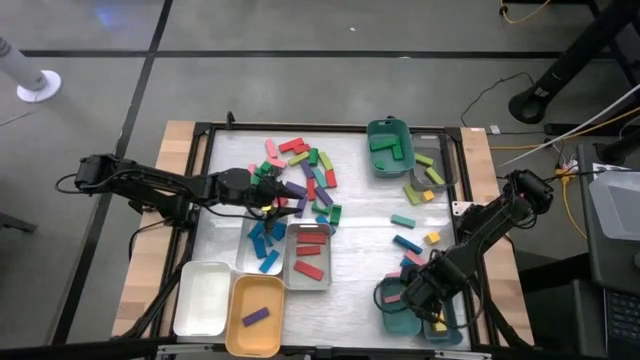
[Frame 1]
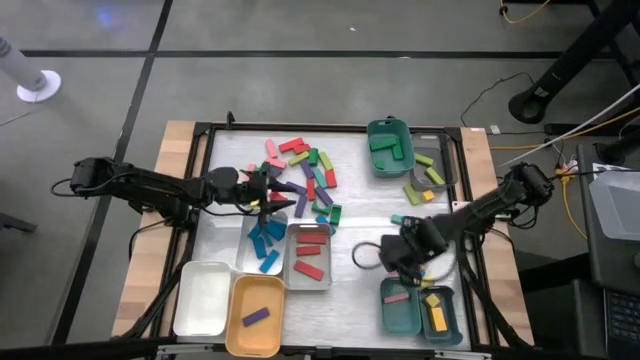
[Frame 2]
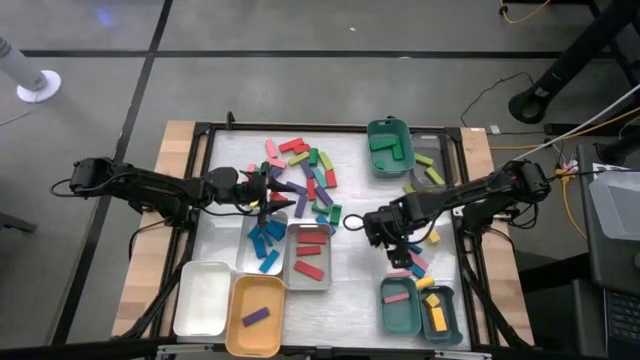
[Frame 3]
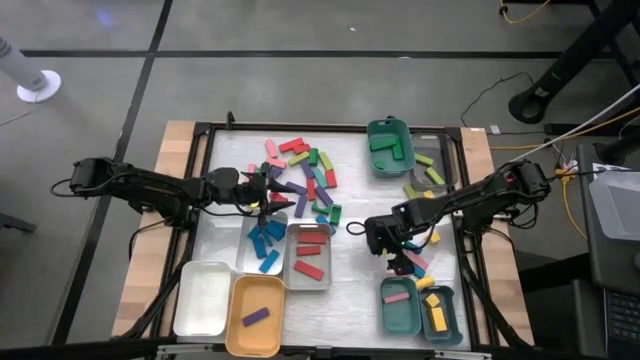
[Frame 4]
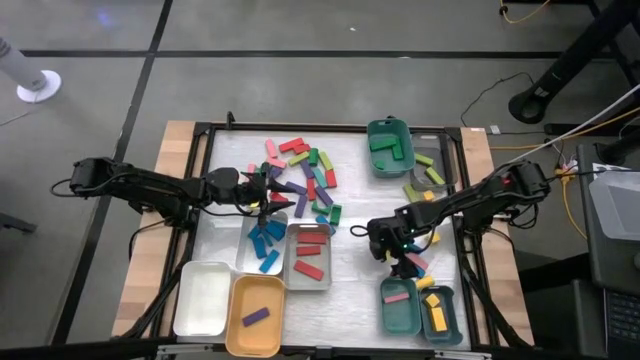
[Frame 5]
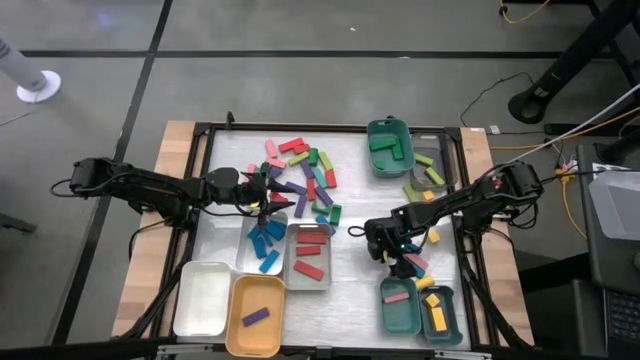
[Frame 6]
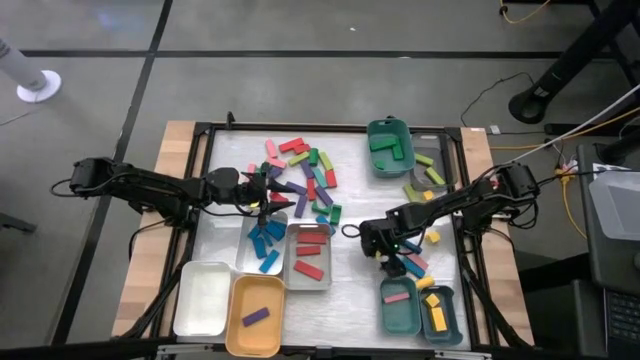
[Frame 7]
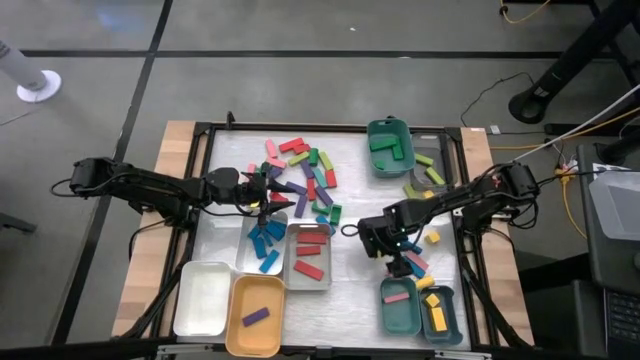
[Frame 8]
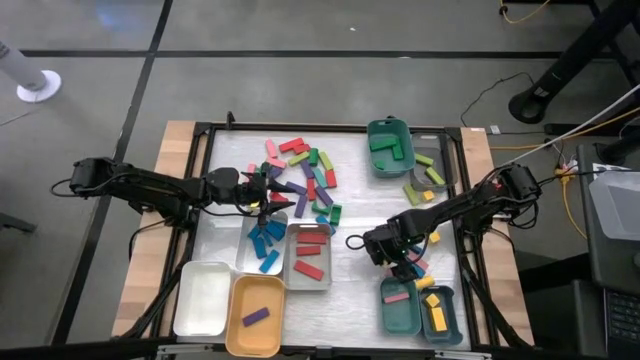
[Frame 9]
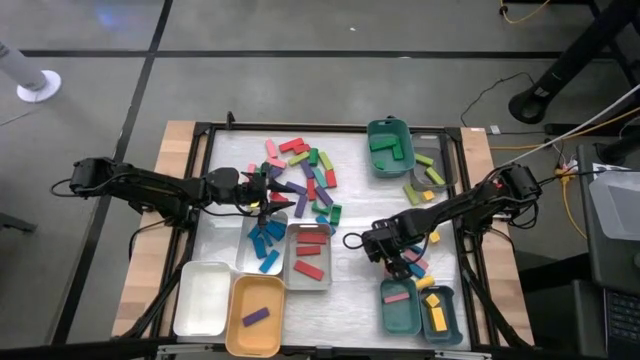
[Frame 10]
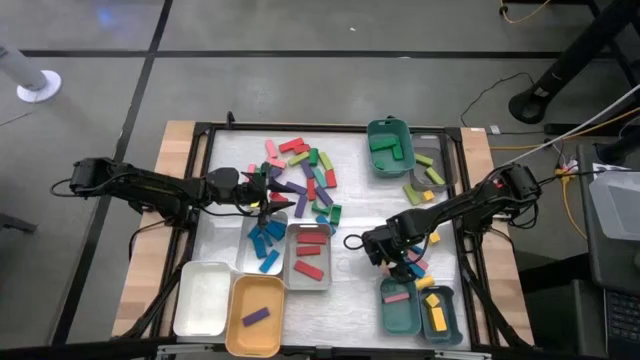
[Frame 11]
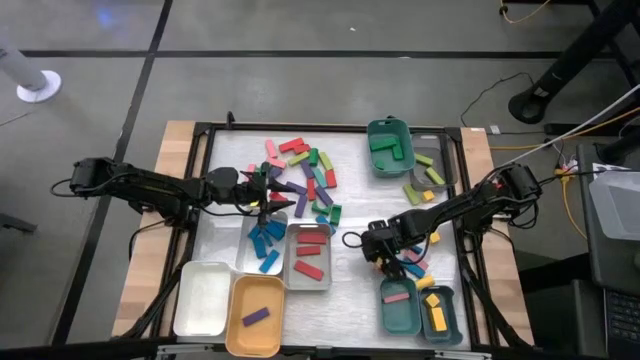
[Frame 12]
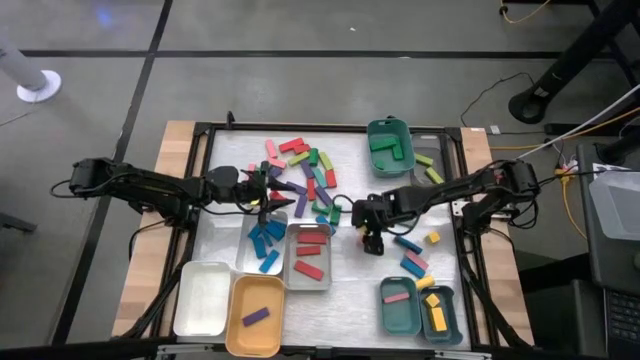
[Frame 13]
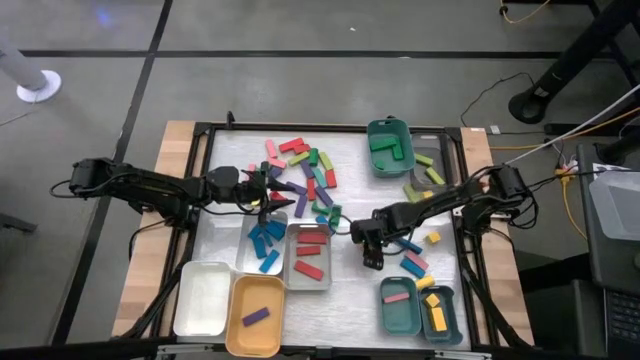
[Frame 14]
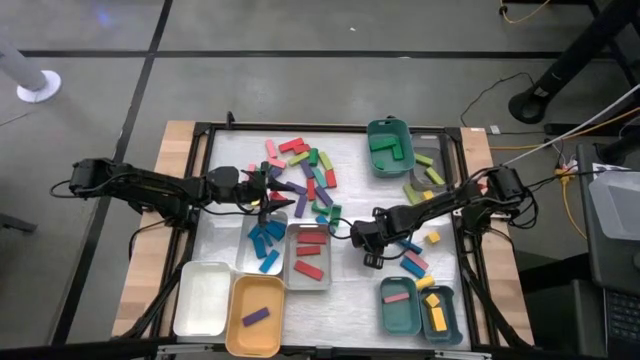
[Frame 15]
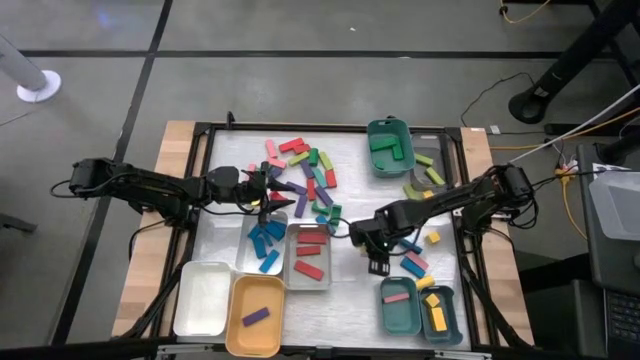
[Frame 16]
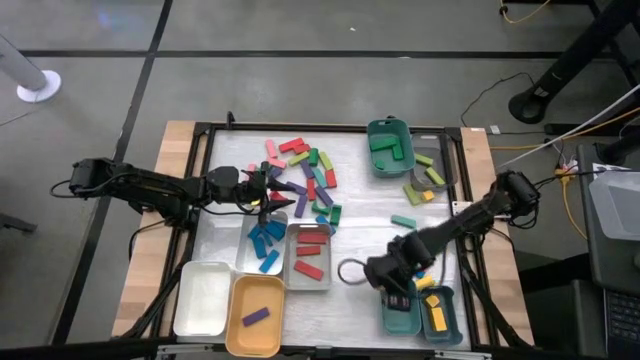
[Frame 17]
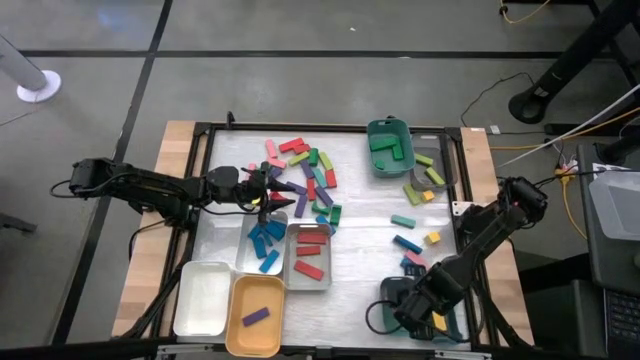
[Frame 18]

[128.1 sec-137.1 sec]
Task: Sort blocks
Put the pink block into the bottom green bin

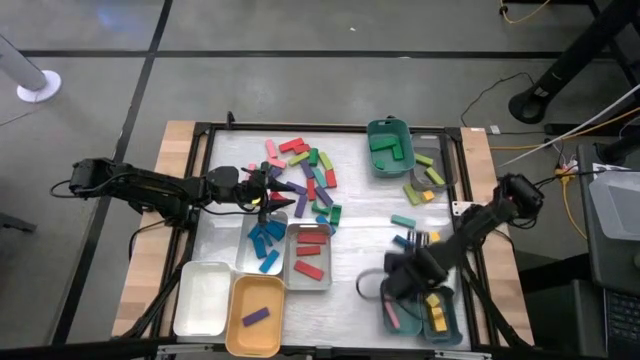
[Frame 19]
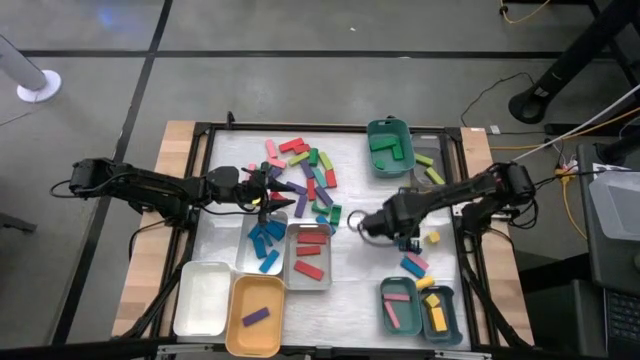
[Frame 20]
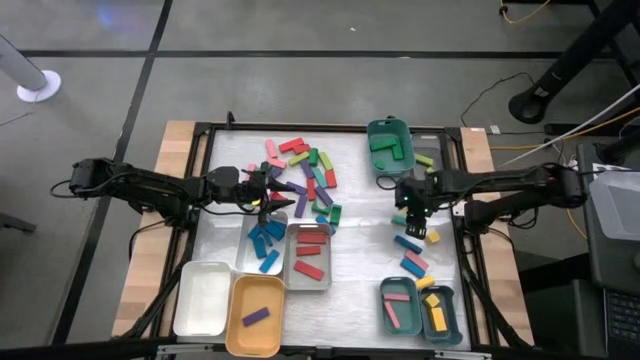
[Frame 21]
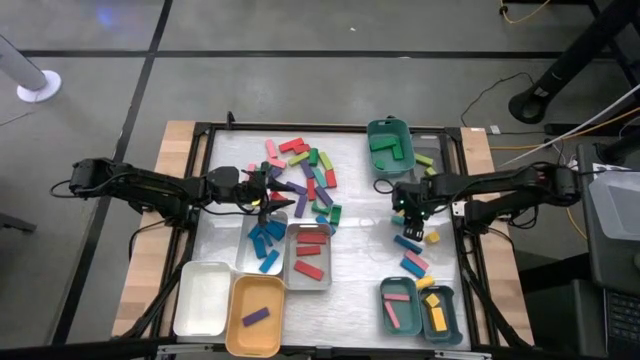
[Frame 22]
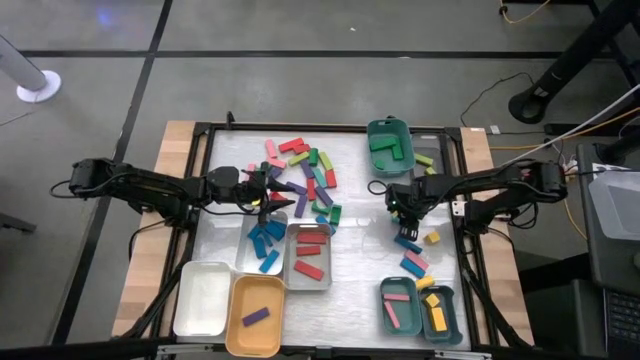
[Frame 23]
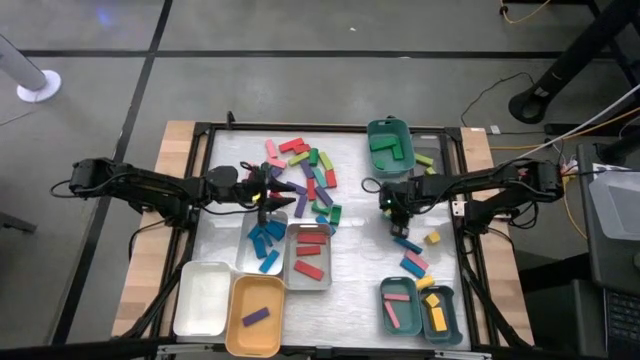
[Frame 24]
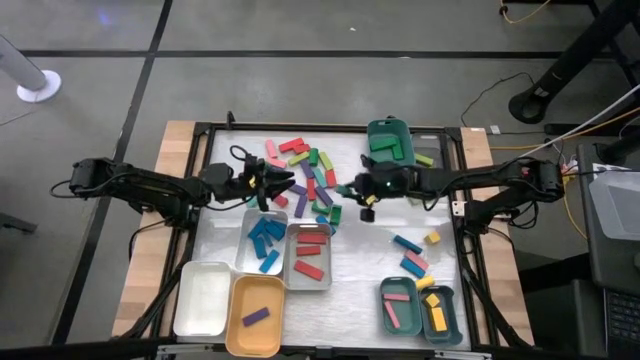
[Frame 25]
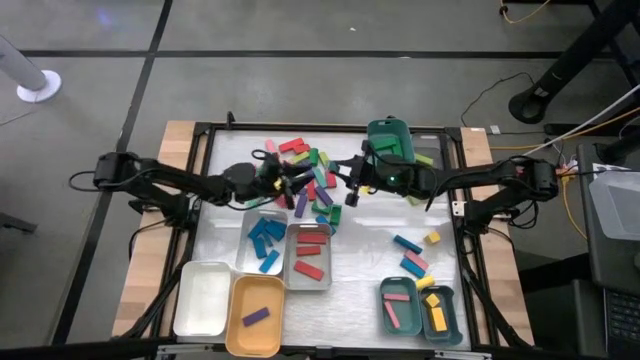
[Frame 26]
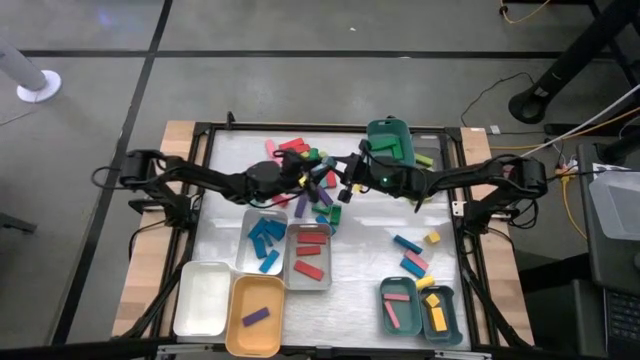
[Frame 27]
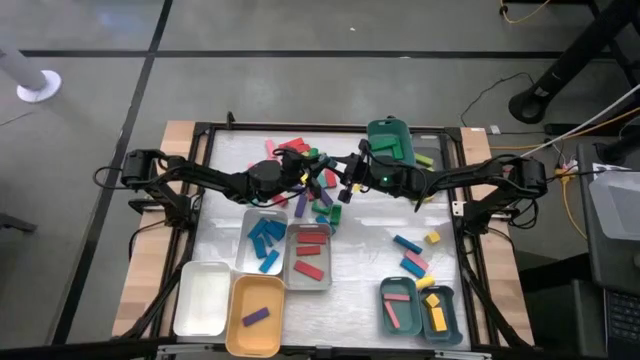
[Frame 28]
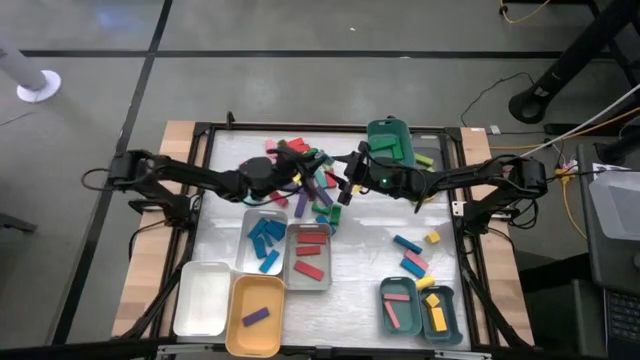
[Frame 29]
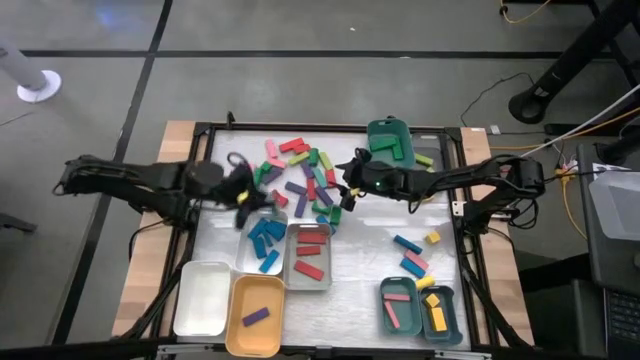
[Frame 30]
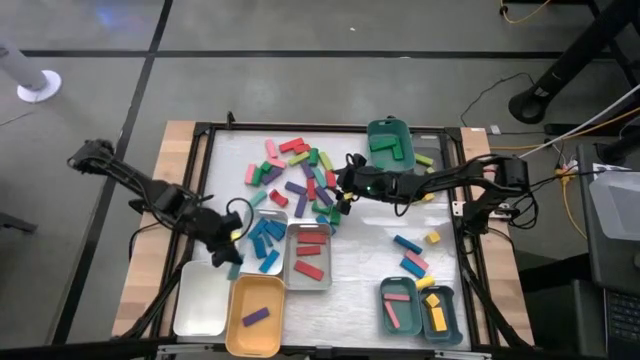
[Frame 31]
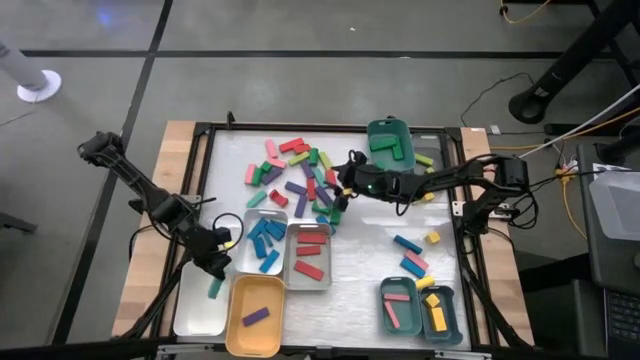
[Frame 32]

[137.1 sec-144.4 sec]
Put the light blue block into the bottom white bin

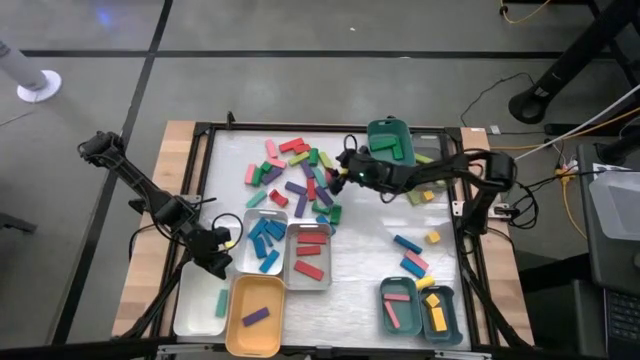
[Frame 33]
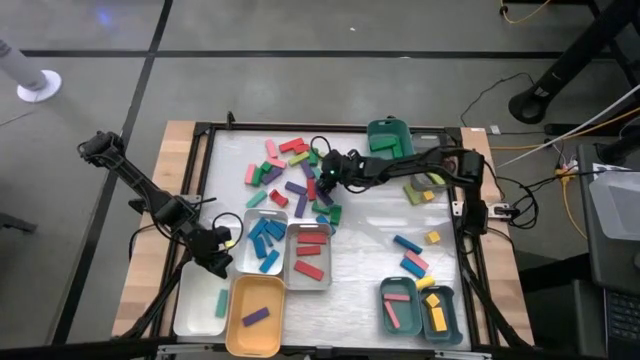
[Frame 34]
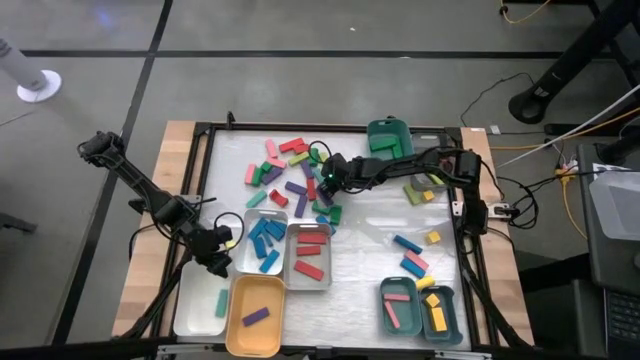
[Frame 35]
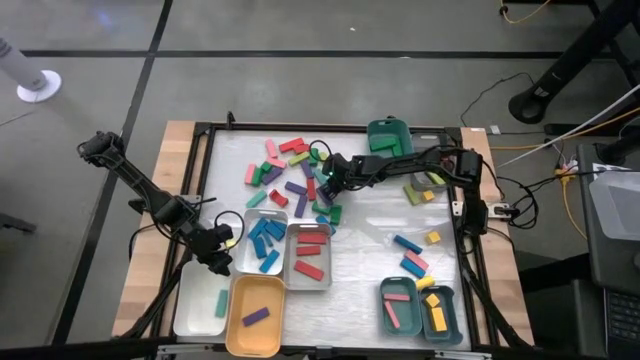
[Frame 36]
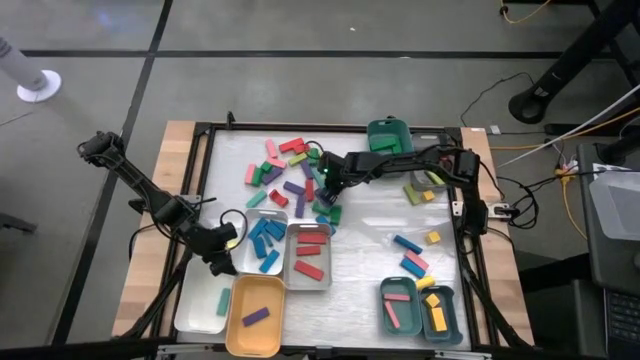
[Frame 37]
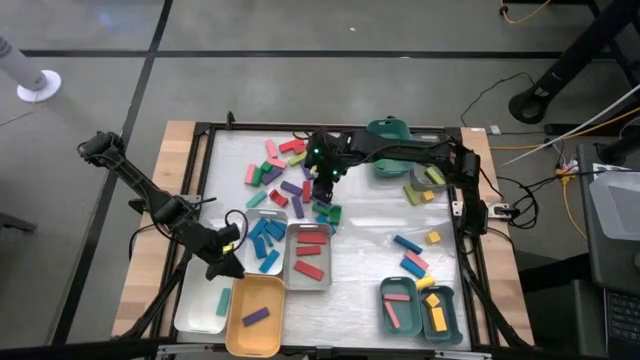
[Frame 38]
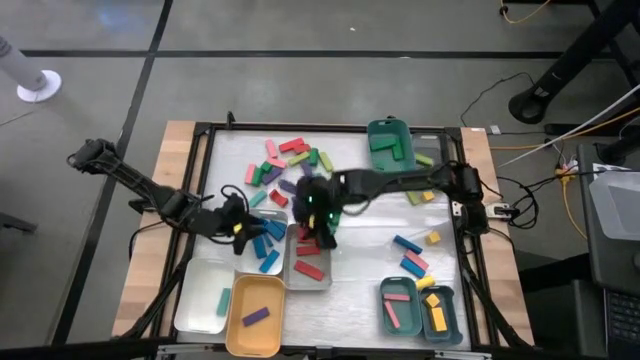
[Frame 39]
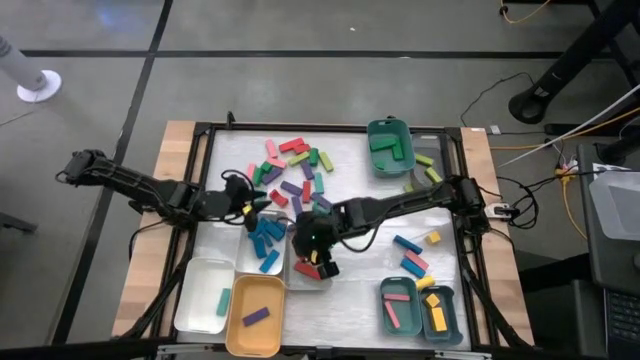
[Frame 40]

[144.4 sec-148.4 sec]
Put the red block into the gray bin

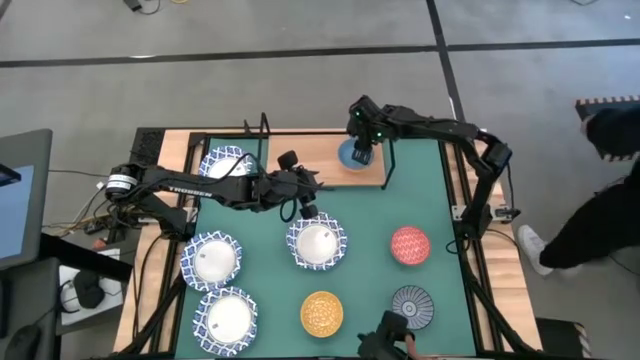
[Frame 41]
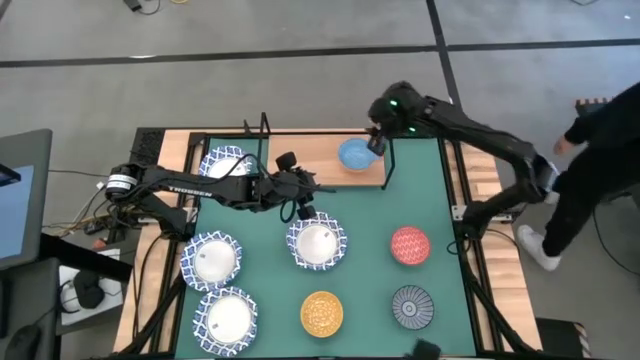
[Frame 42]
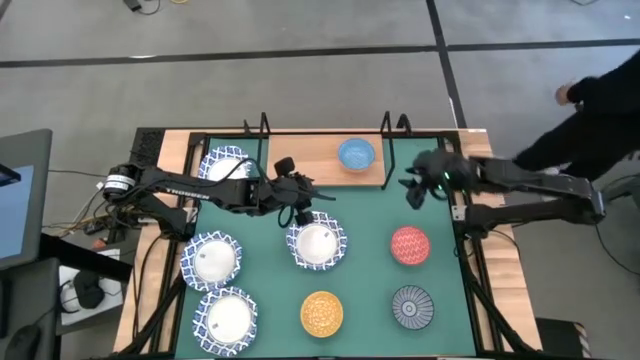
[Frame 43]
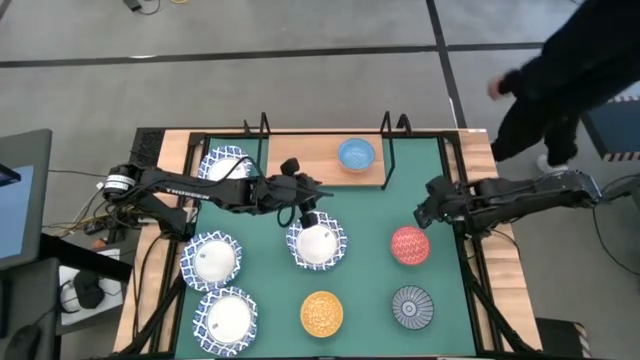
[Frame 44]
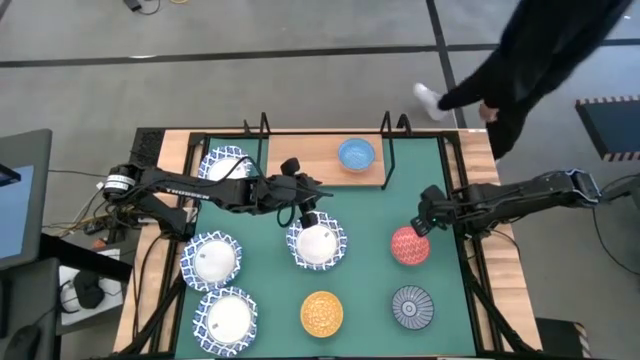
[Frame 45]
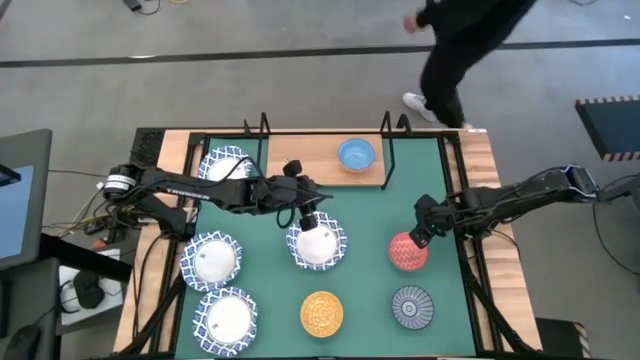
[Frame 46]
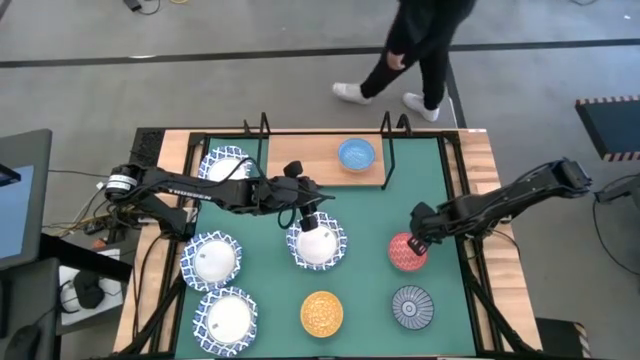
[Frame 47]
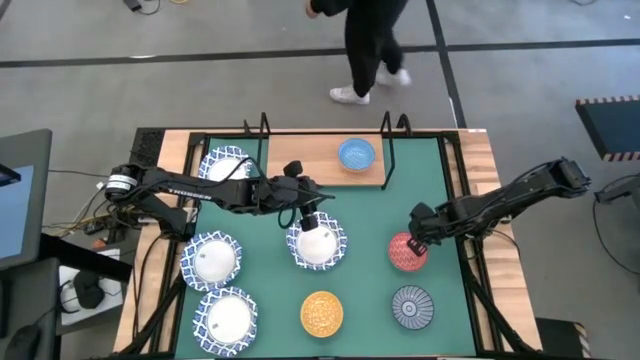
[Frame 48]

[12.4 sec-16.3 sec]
Task: Place and stack bowls onto a shelf
Stack the red patterned bowl on top of the light blue patterned bowl
